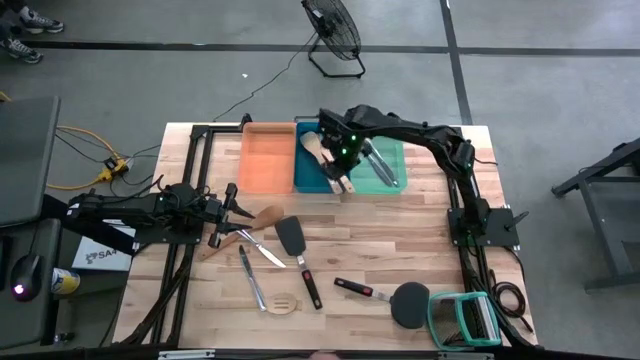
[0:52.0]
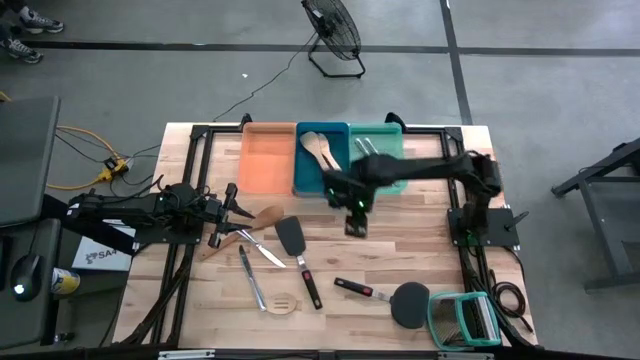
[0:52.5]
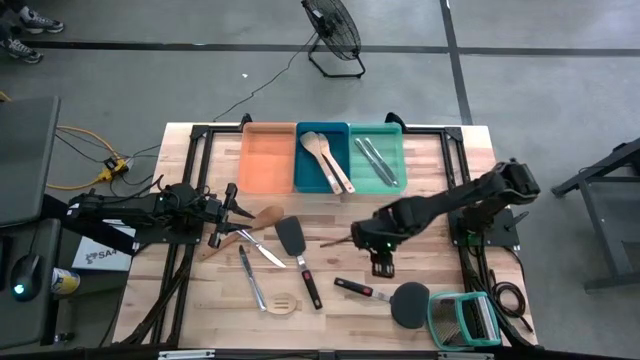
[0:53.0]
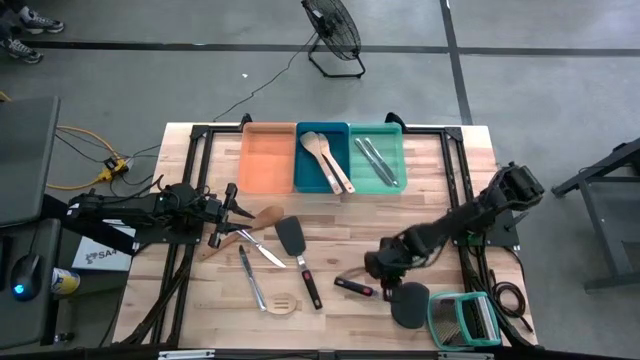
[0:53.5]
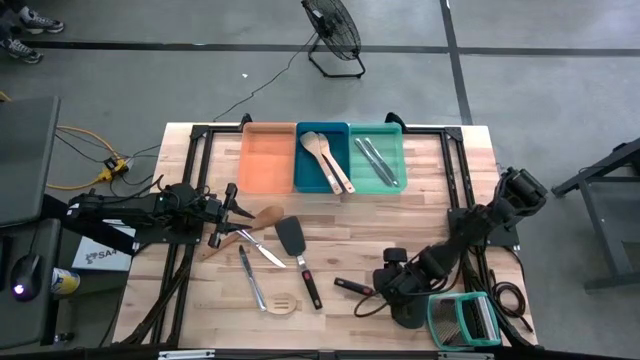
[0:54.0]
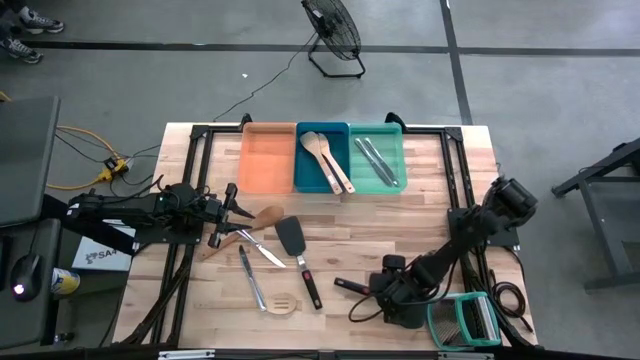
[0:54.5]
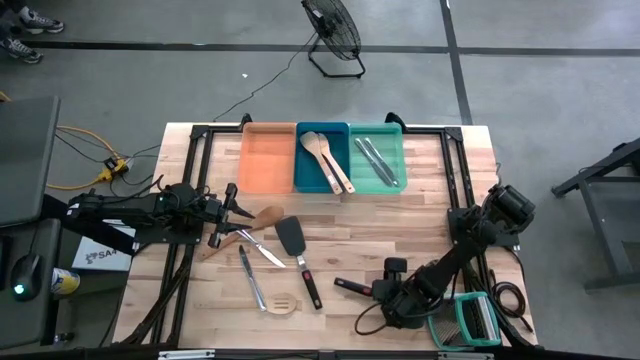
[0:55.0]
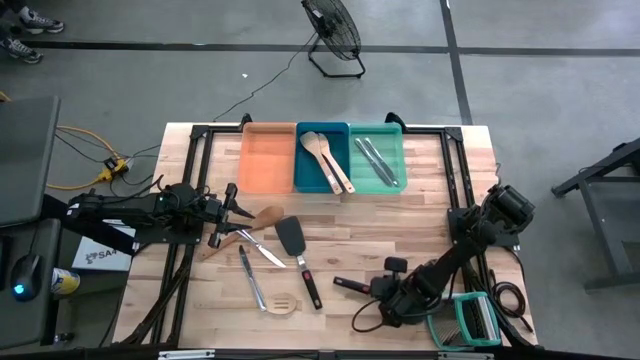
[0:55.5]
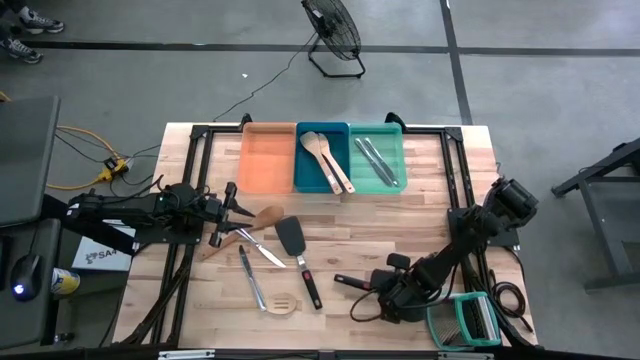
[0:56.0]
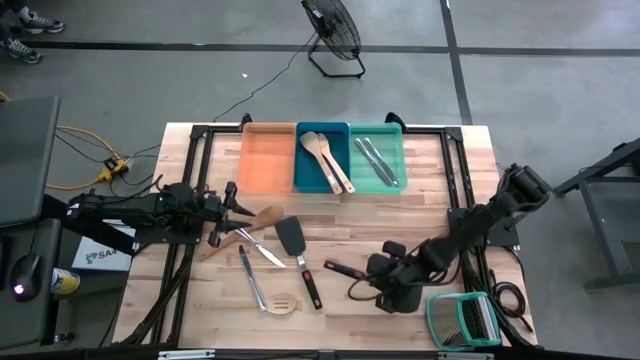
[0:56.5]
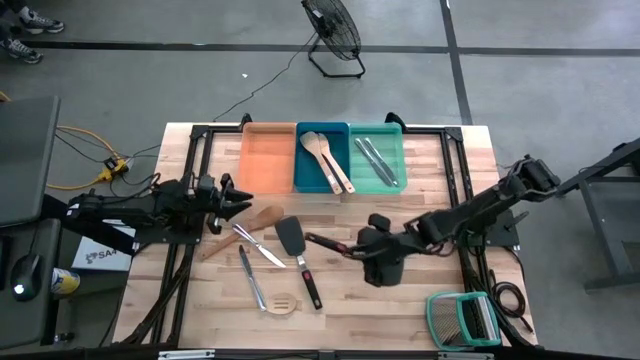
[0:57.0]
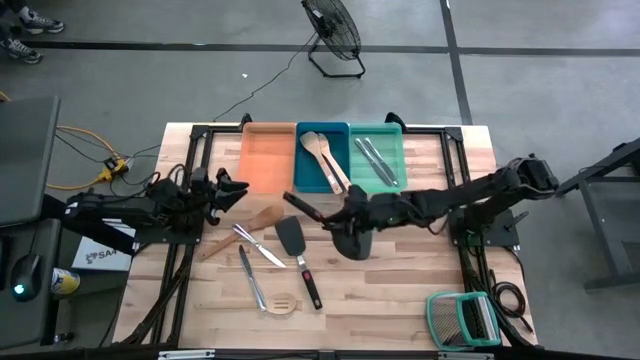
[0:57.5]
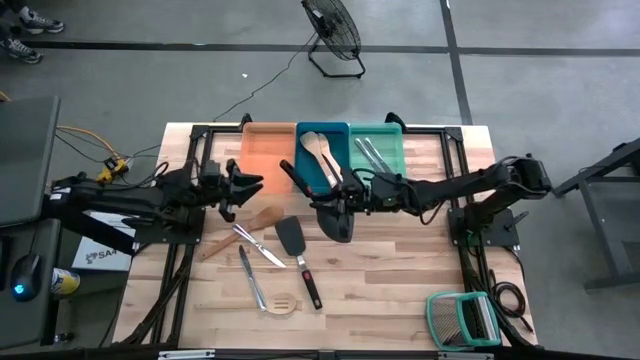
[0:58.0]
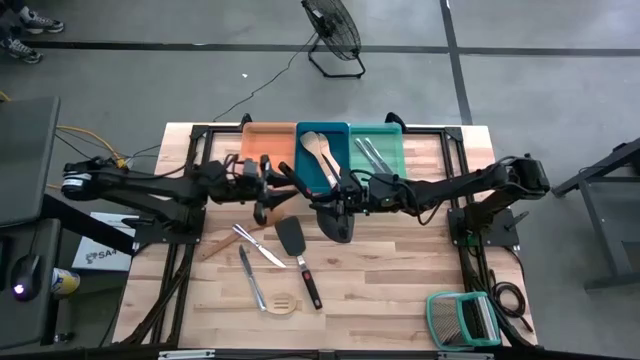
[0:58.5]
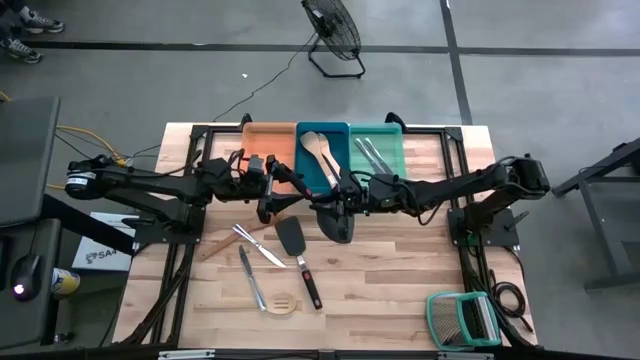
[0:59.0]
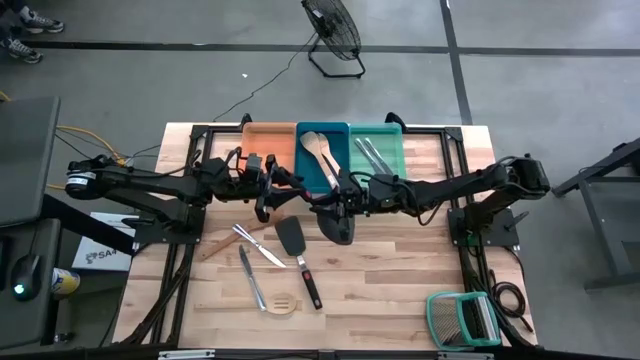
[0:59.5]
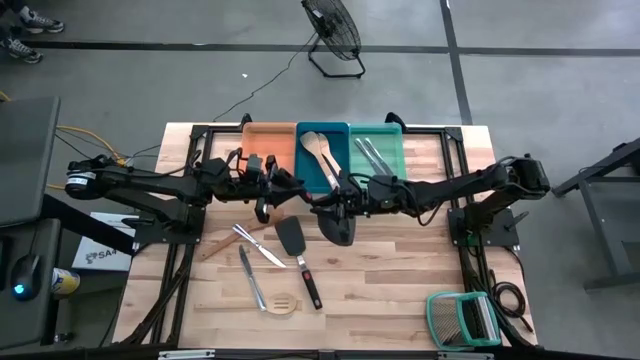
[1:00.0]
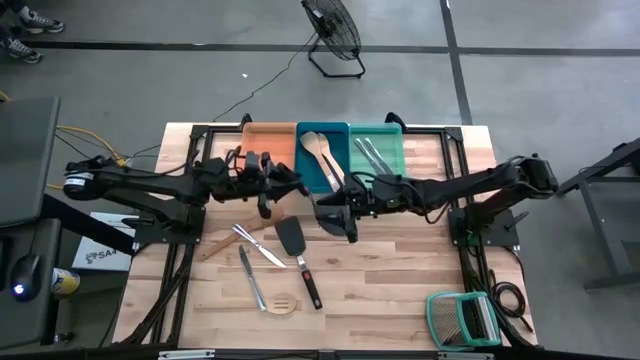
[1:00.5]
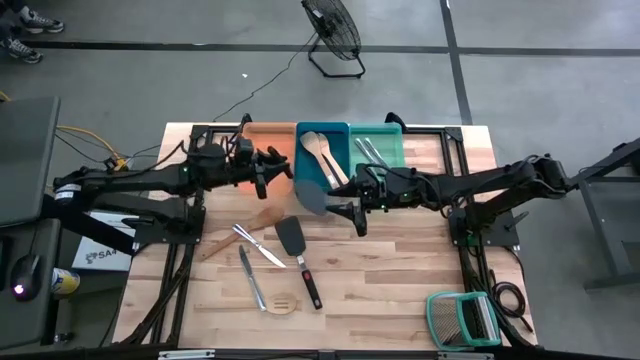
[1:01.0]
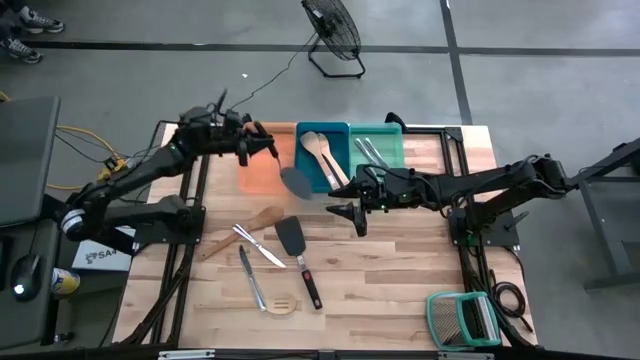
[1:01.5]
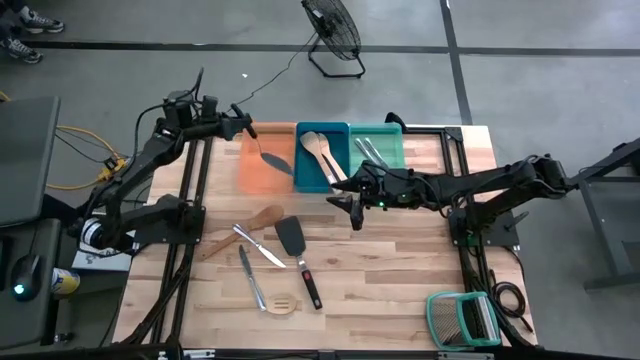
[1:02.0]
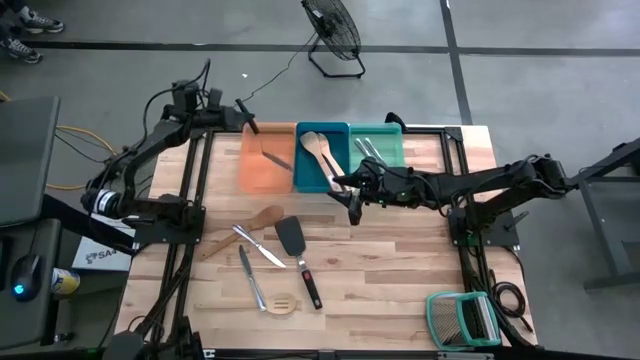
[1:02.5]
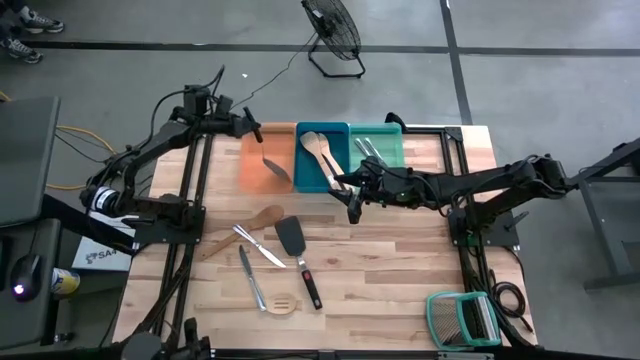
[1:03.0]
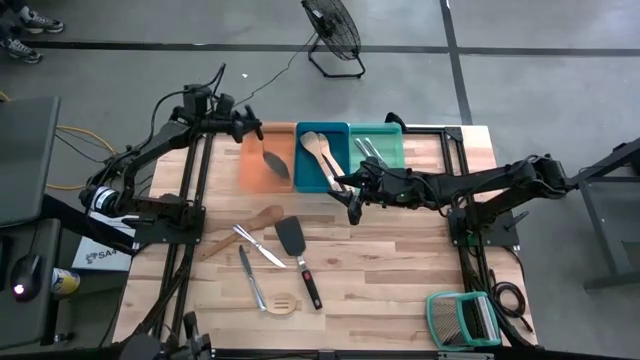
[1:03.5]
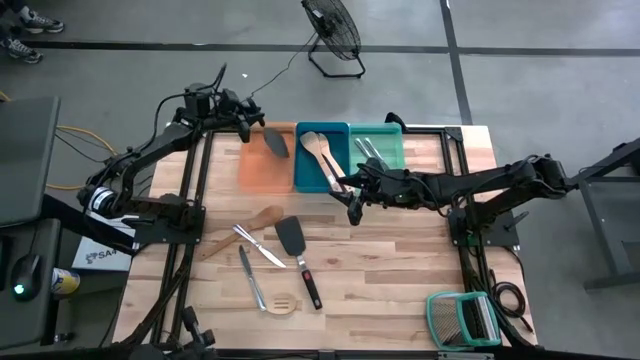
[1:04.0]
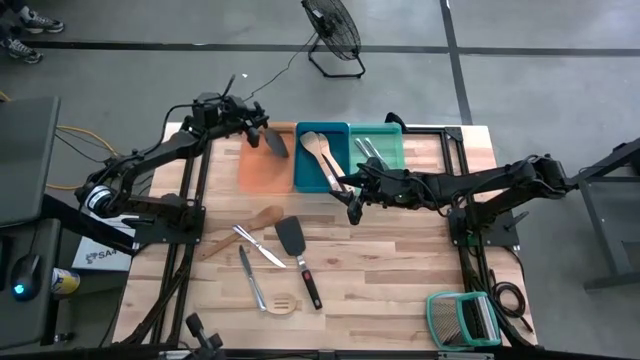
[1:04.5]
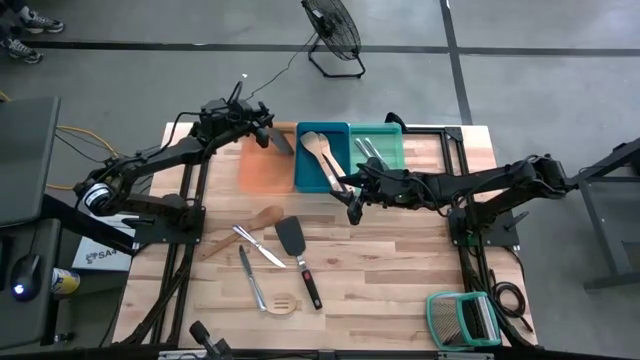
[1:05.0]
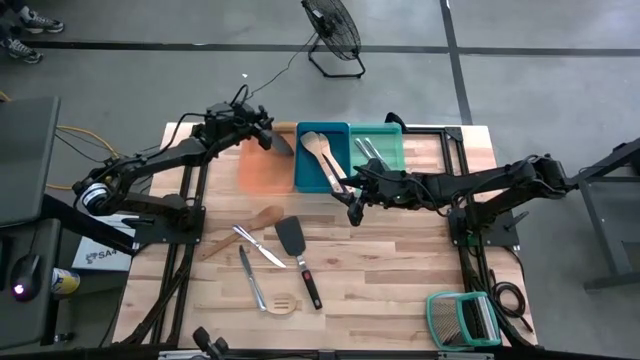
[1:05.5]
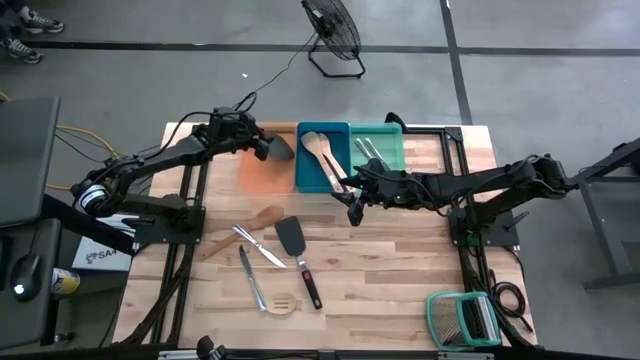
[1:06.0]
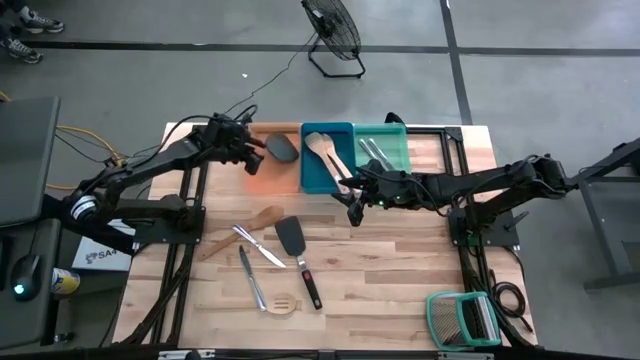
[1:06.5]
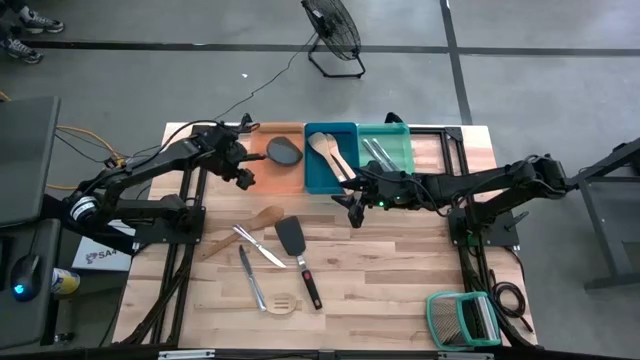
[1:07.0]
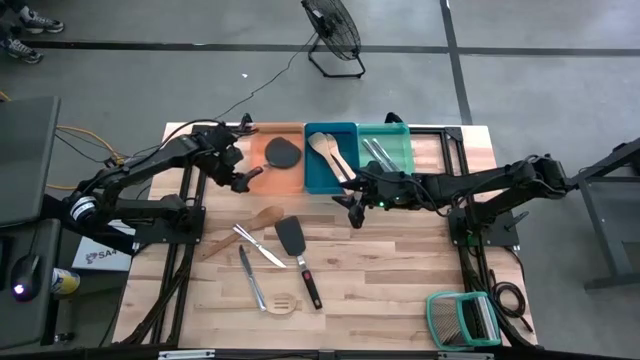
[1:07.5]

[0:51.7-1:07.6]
Task: Pick & Place Kitchen Items
Put the black silicone spatula into the orange bin

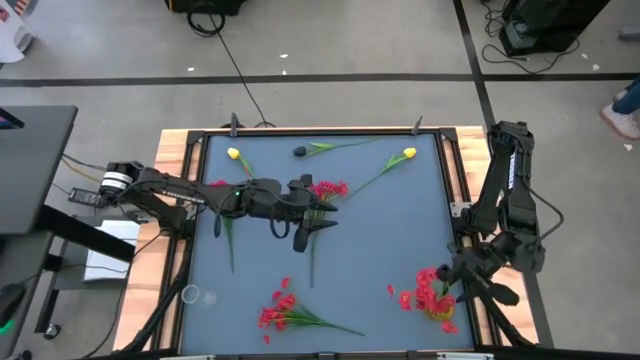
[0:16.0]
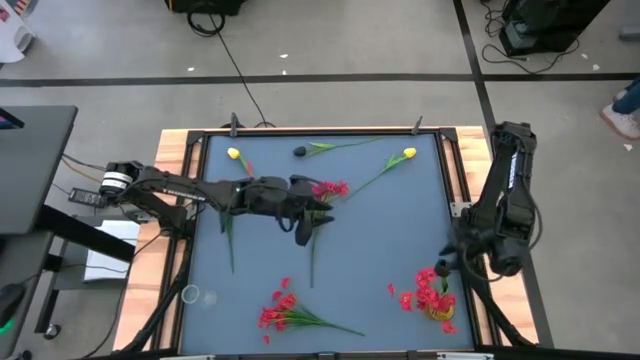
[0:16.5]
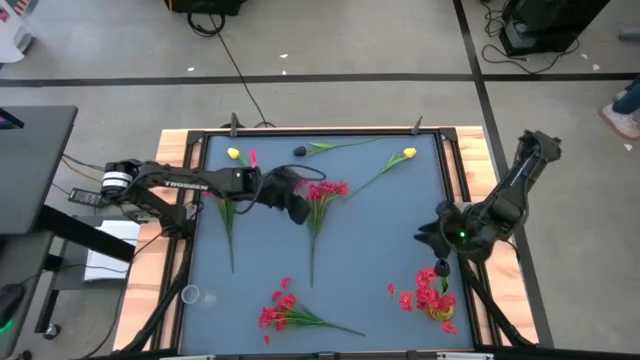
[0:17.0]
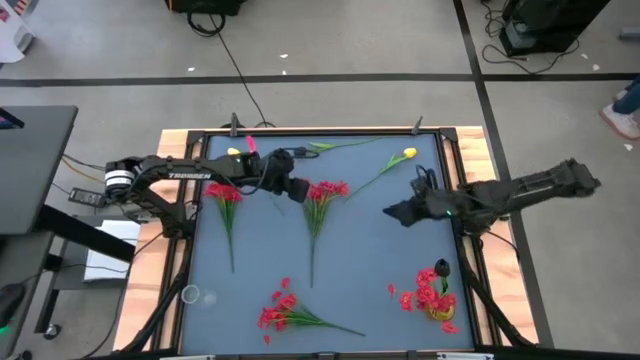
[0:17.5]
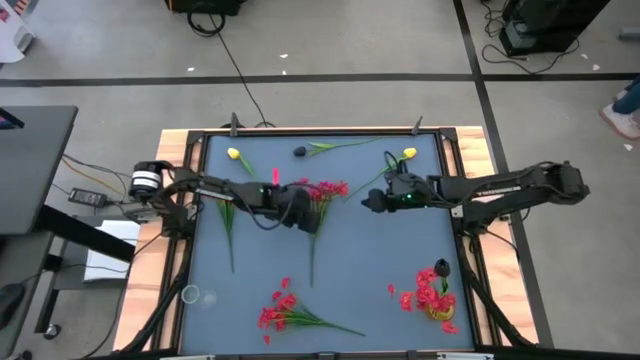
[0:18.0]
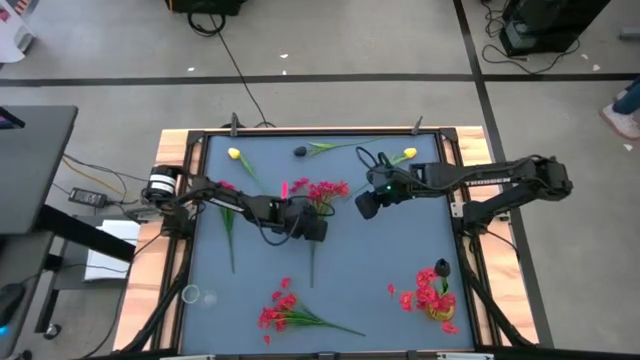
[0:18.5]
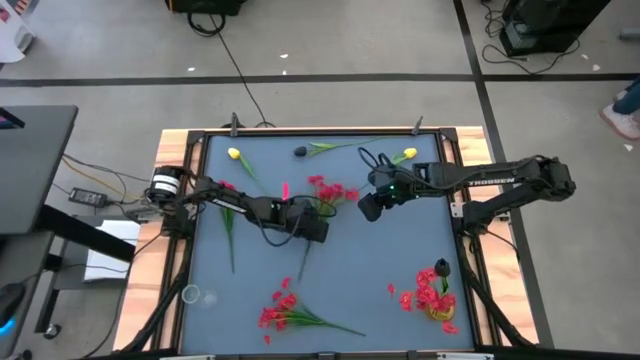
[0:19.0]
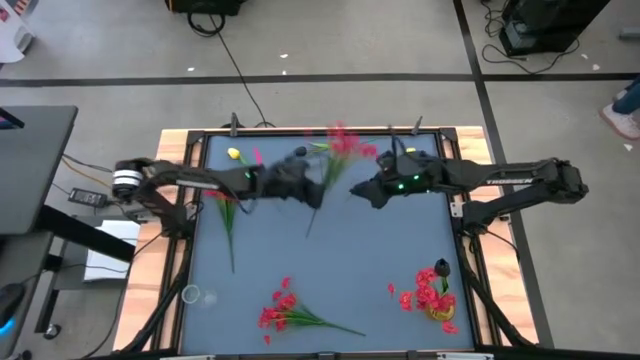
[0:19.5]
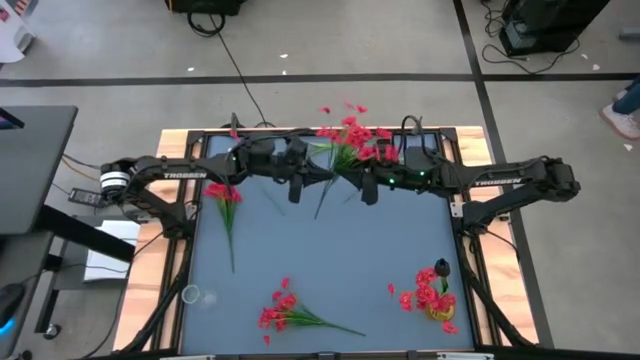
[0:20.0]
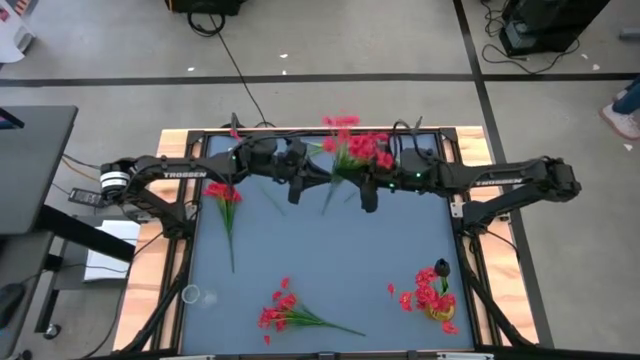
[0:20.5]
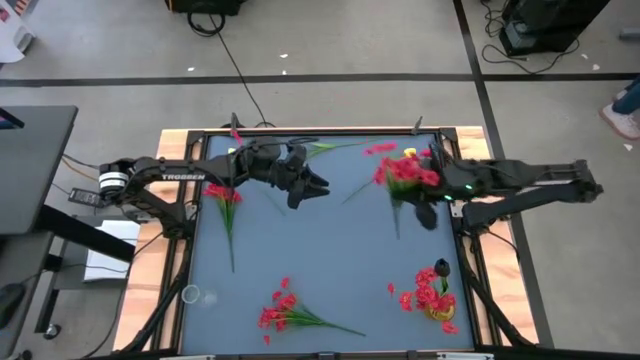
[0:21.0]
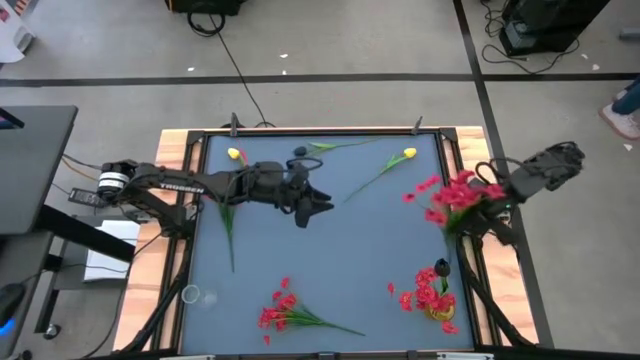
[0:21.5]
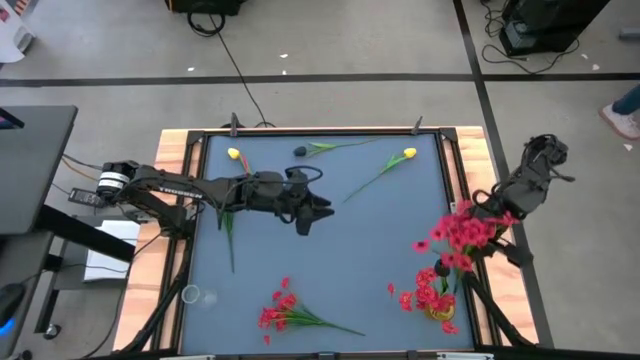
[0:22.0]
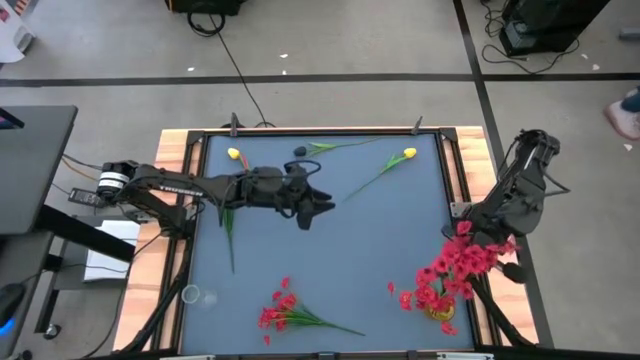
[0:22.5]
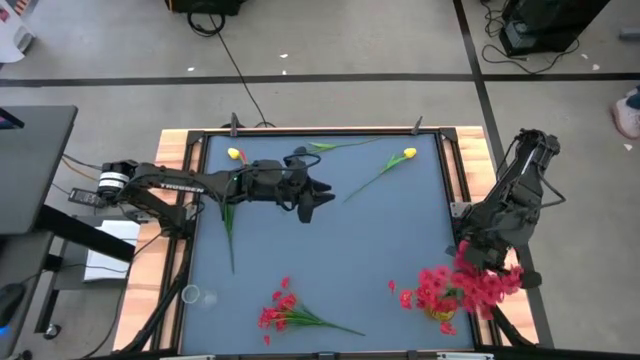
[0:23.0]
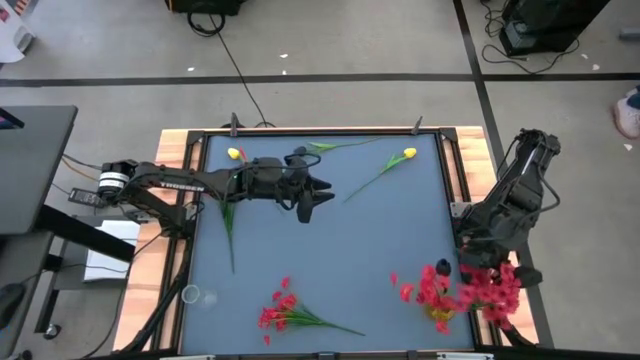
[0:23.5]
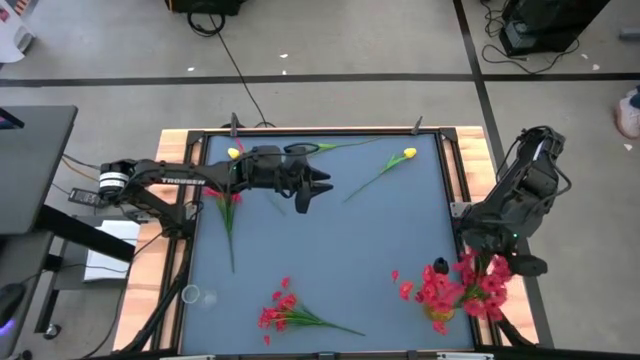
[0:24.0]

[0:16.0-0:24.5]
Task: Sort flowers into vase by color
Put the top right red flowers into the yellow vase
